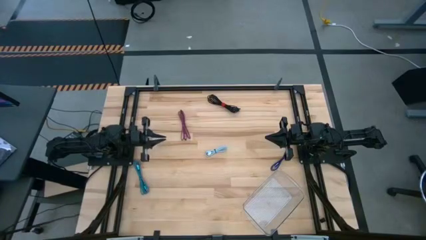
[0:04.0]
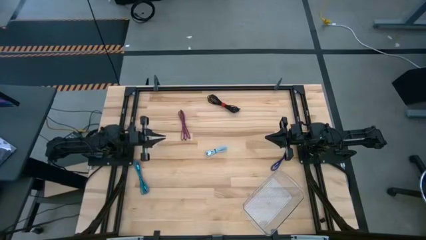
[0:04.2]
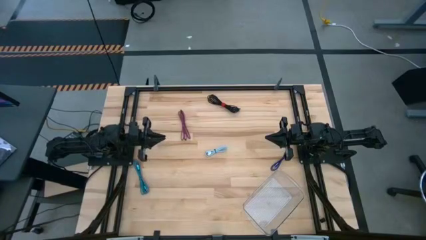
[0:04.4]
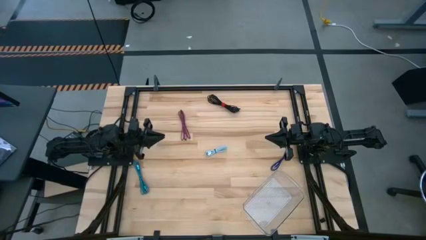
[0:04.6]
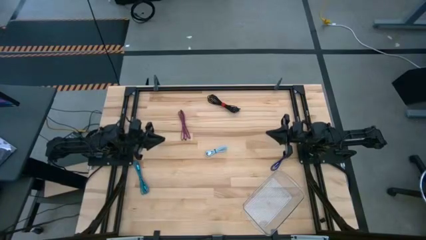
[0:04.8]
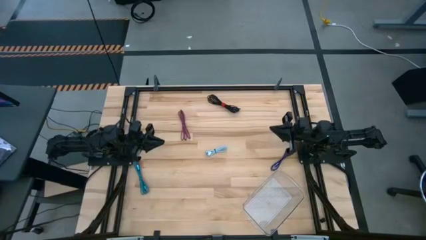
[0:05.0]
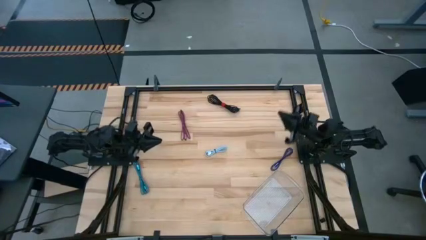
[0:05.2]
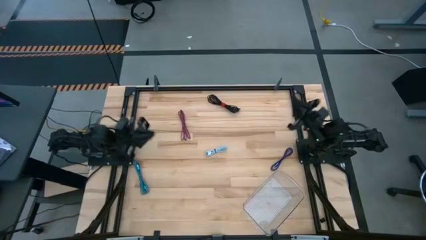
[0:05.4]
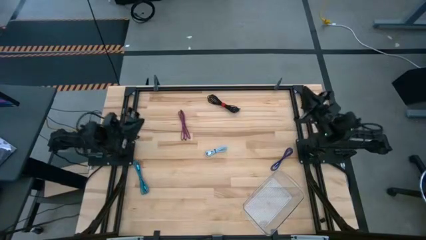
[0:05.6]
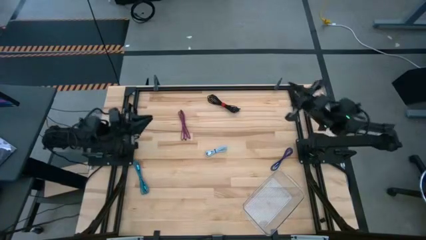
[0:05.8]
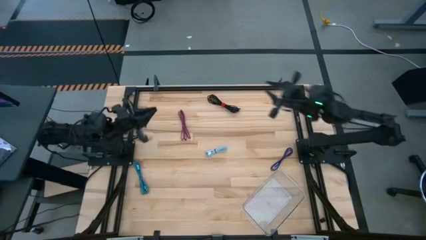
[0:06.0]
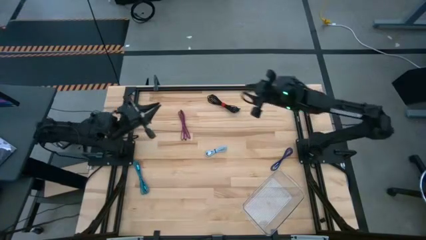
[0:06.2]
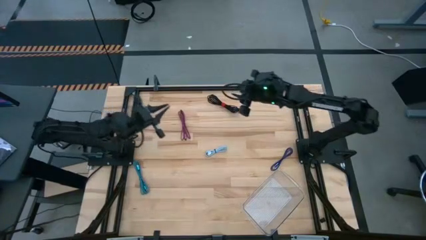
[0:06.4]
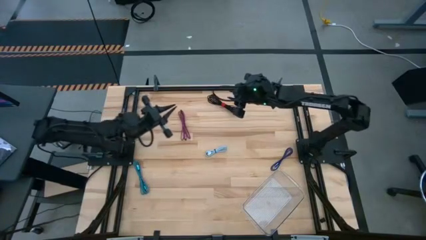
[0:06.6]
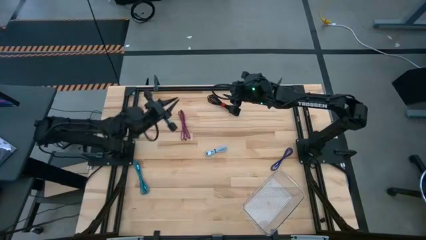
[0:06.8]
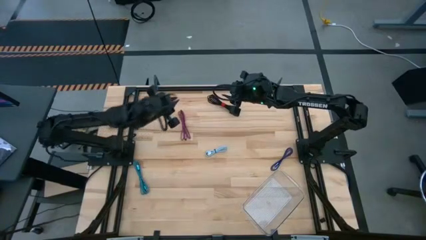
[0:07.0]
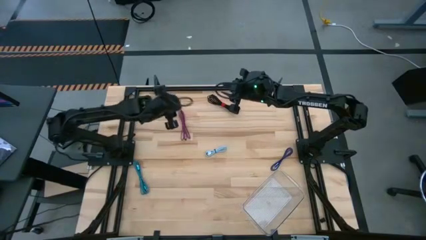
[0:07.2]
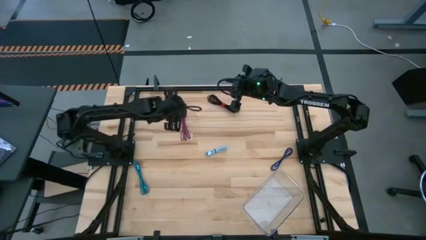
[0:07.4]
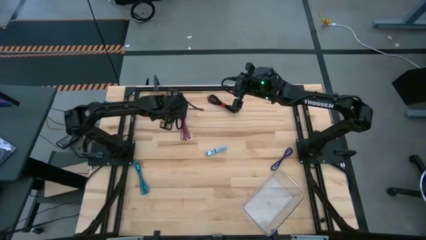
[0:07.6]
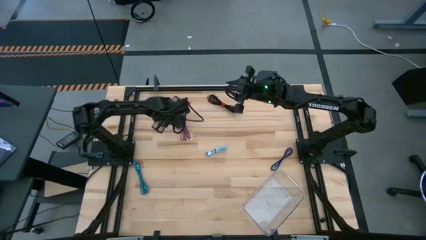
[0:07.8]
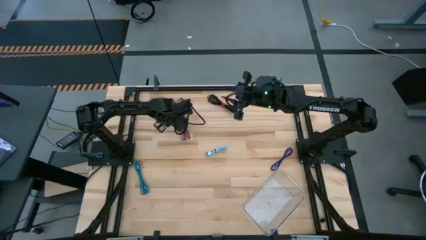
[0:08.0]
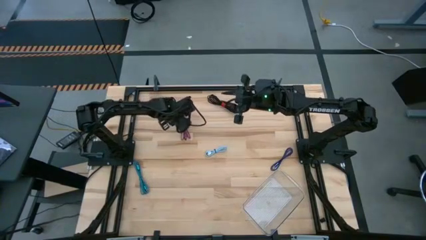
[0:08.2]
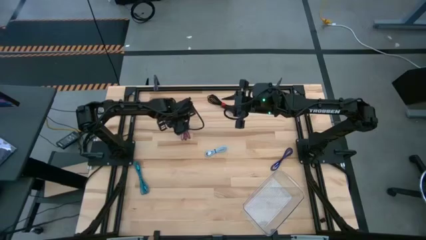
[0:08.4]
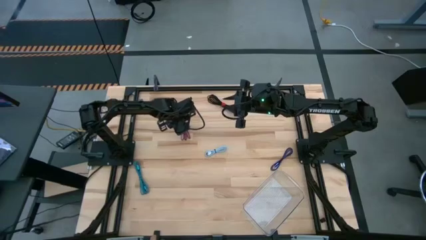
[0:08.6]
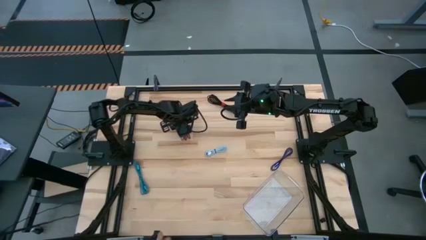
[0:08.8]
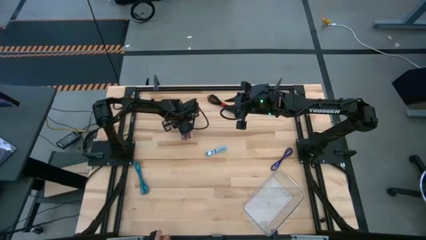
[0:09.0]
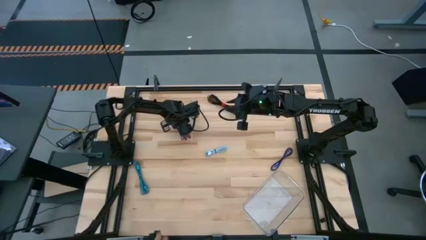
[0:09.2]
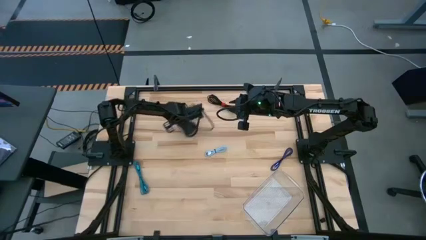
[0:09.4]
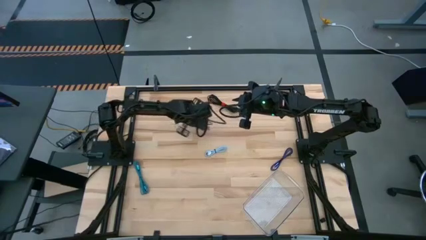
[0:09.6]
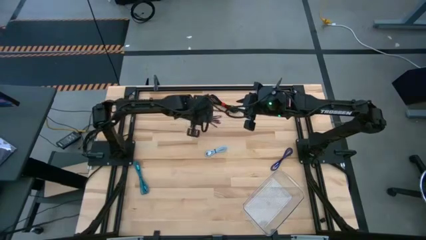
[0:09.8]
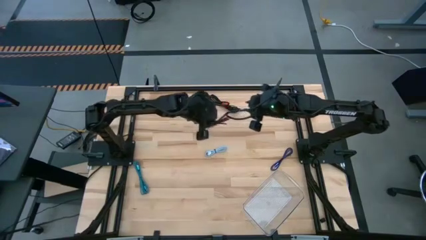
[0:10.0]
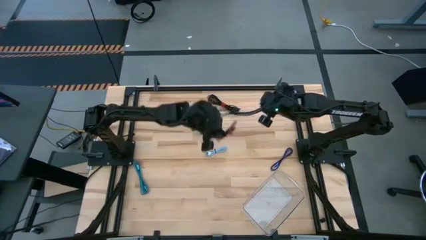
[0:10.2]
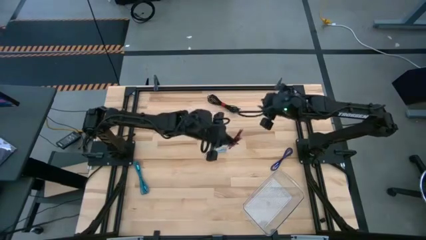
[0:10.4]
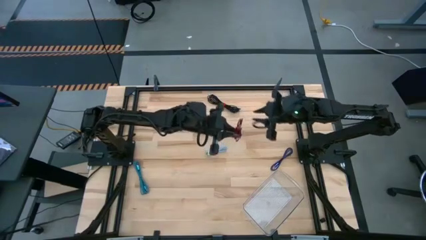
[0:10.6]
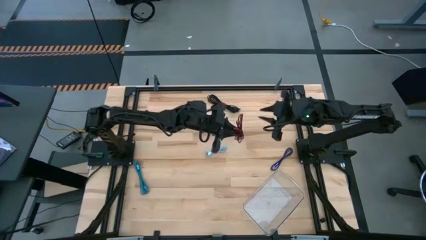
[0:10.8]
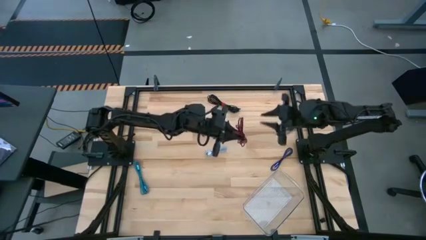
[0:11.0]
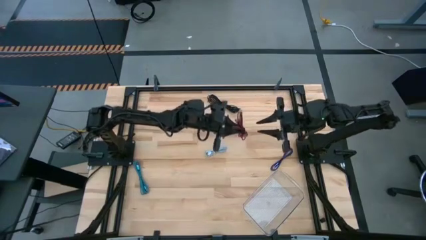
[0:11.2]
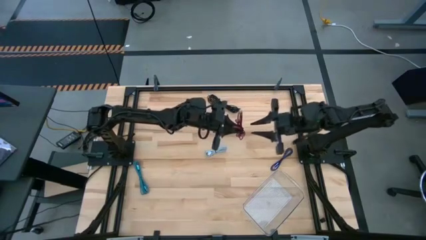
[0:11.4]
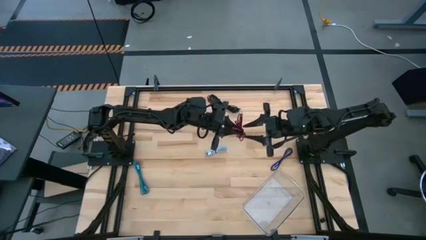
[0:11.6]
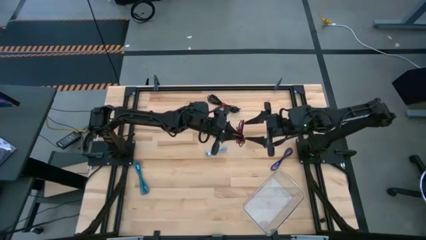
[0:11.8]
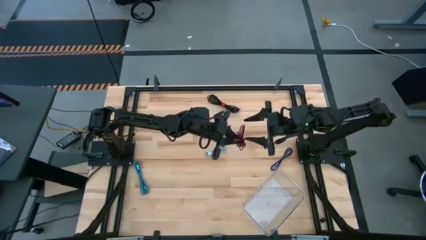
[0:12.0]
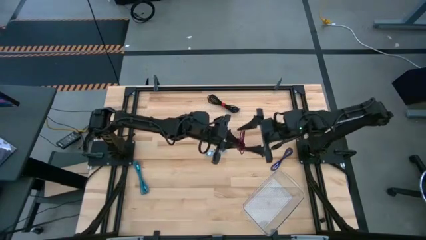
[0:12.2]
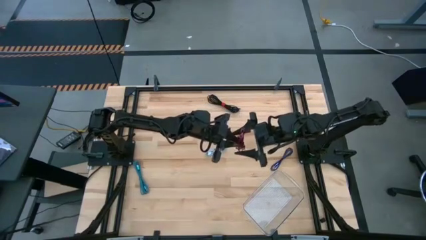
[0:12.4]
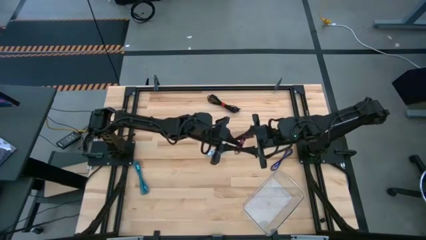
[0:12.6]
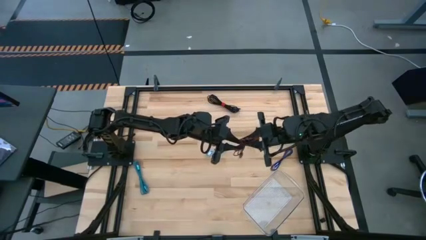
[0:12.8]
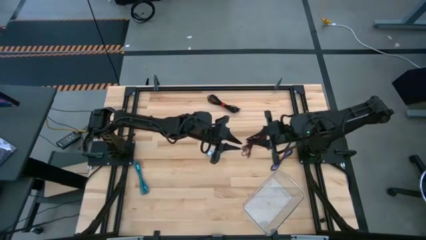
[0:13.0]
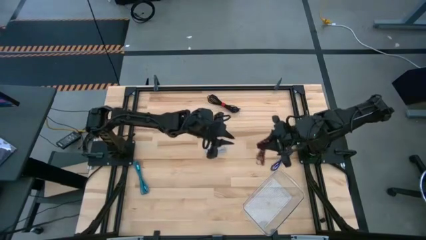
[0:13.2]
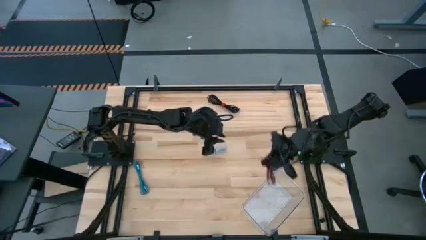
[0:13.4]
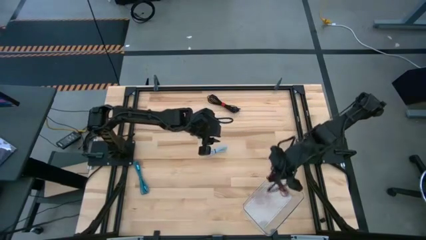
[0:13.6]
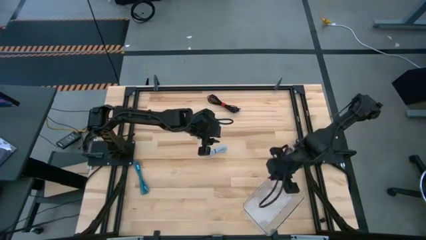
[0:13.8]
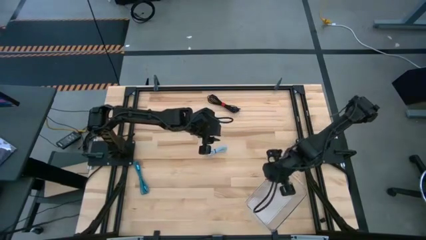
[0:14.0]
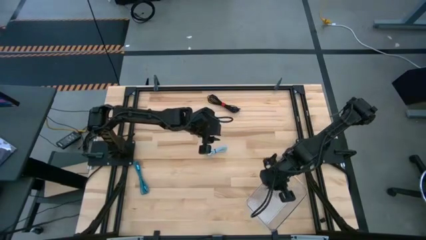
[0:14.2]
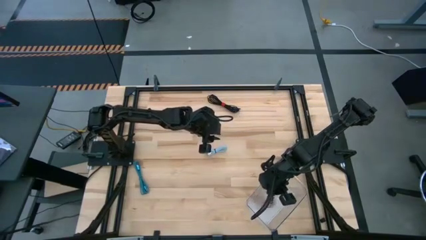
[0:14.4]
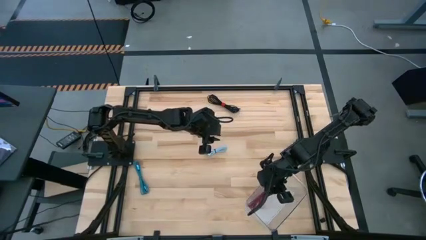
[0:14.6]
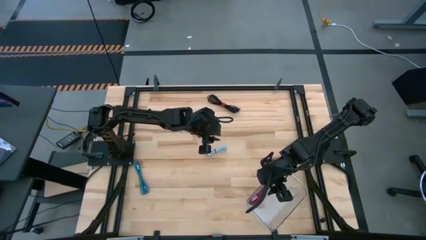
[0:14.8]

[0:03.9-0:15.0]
Task: Pick and place USB-C Cables
Put the pink USB cable into the transparent bin

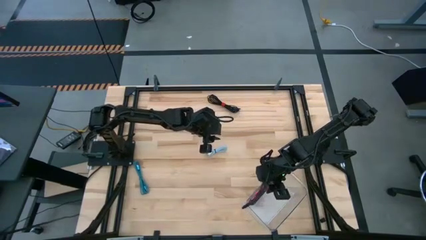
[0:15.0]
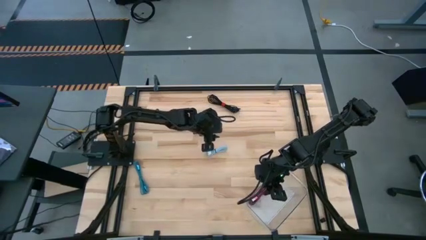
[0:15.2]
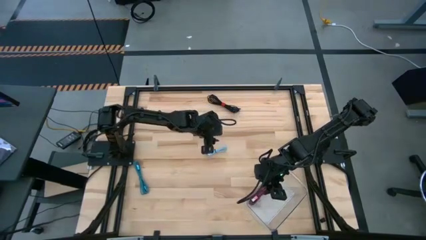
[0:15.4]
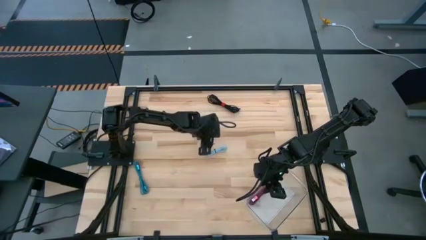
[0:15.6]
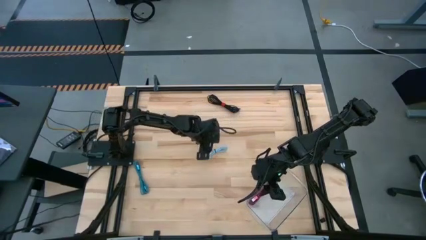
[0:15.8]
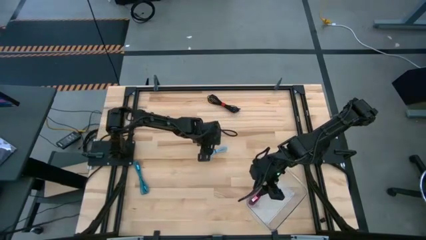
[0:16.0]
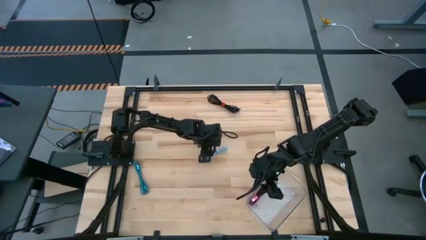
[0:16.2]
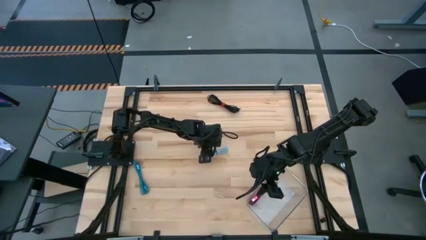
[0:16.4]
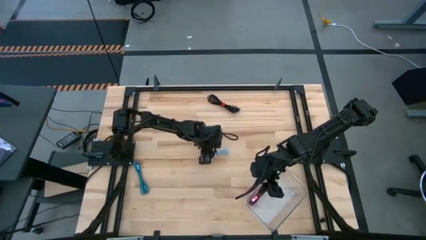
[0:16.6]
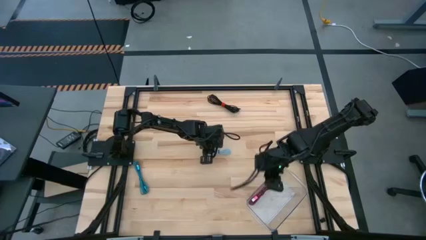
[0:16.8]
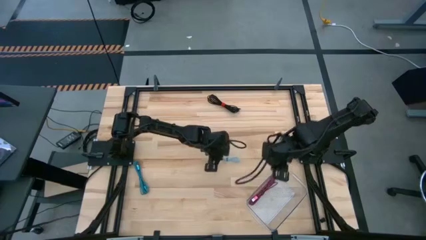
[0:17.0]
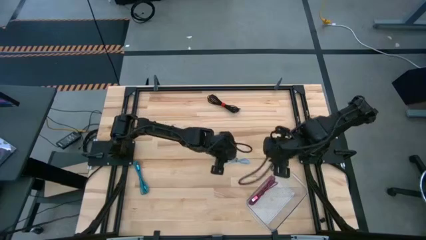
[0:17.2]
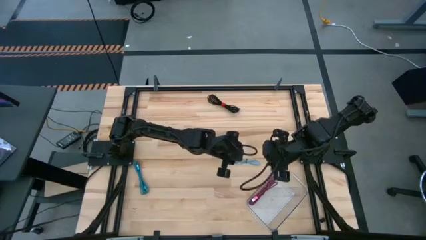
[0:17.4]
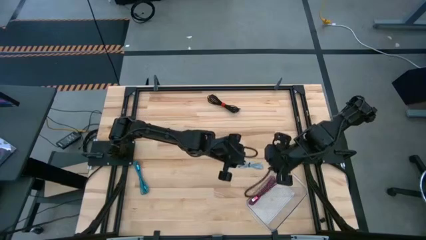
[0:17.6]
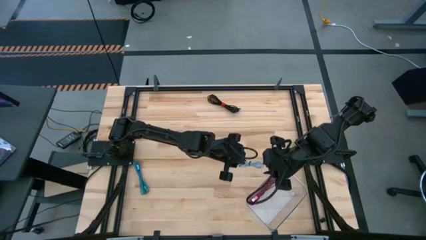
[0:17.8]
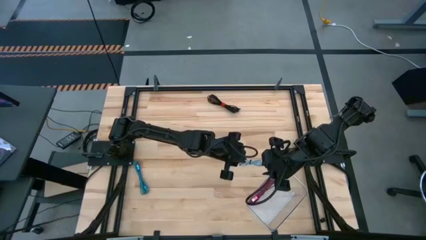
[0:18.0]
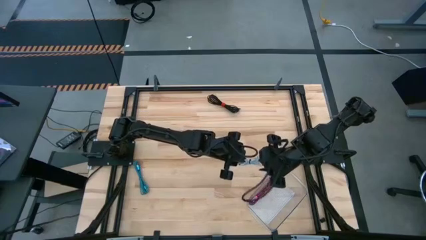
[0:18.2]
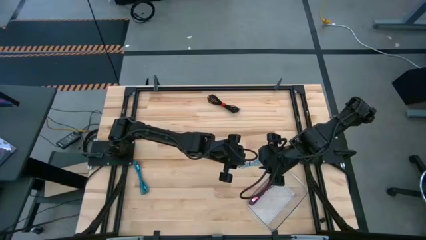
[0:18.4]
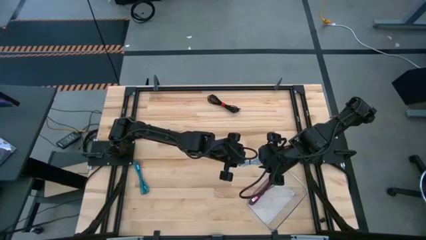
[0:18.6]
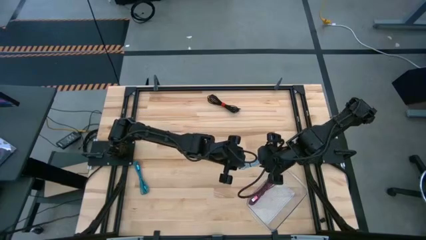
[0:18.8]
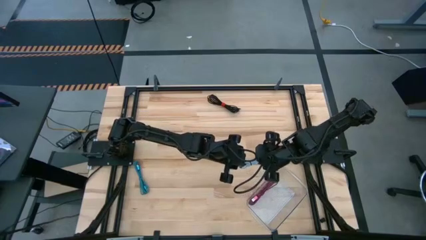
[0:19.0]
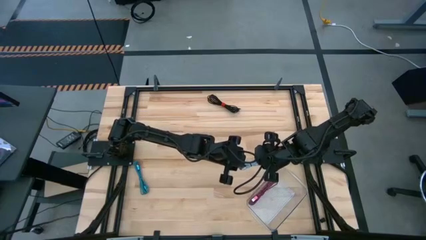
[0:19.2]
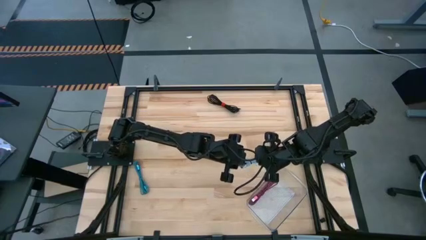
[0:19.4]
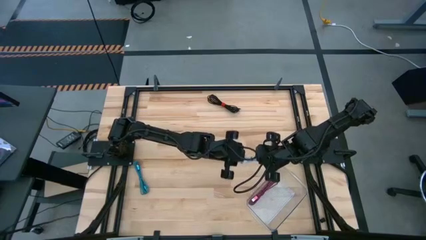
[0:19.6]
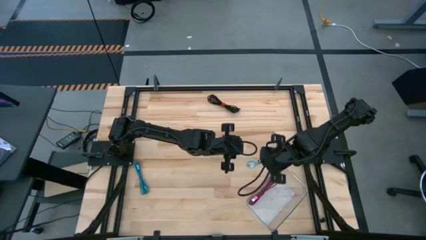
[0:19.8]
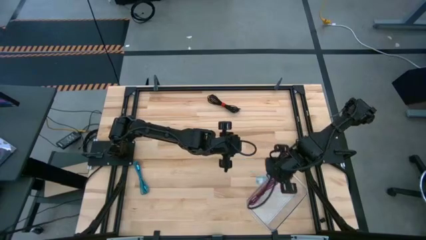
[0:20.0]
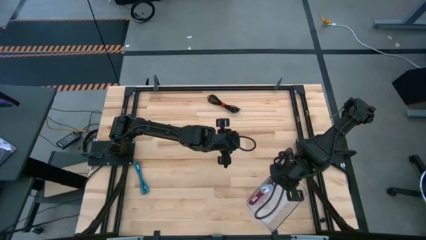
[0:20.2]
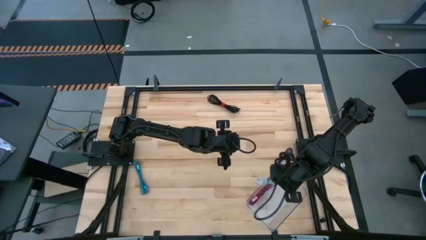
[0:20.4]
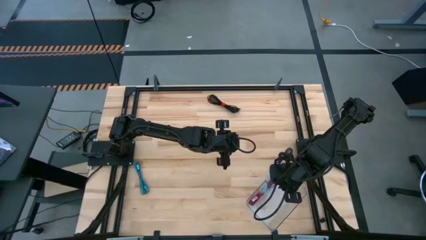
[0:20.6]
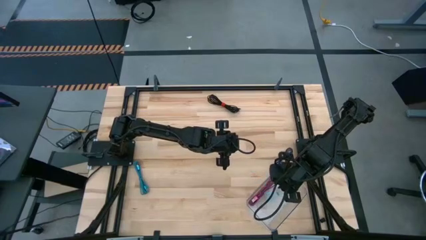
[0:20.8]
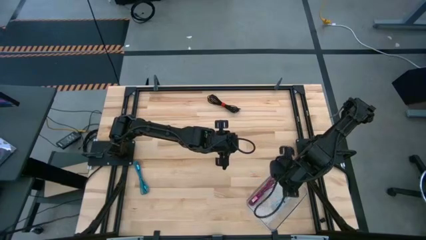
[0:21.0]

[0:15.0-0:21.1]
Put the light blue USB cable into the transparent bin
